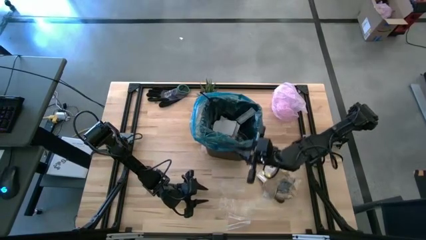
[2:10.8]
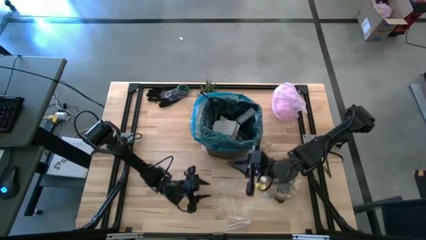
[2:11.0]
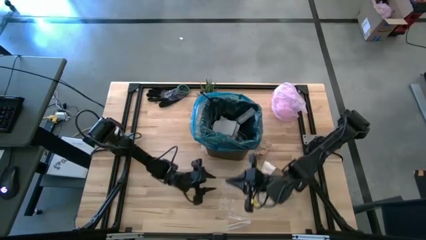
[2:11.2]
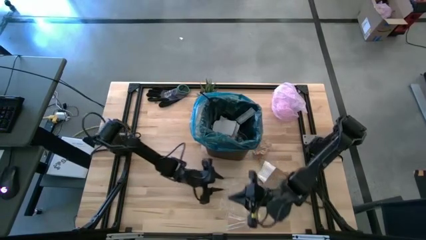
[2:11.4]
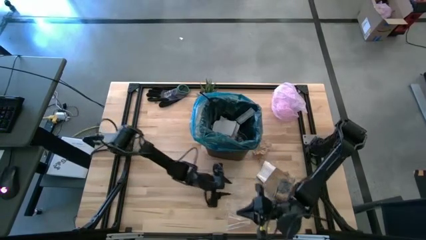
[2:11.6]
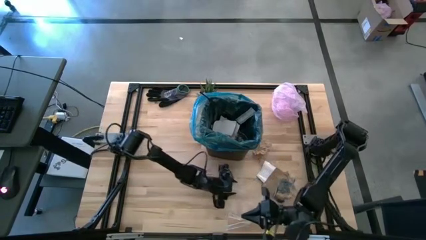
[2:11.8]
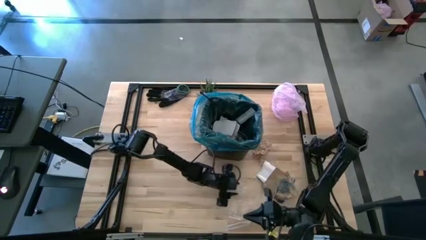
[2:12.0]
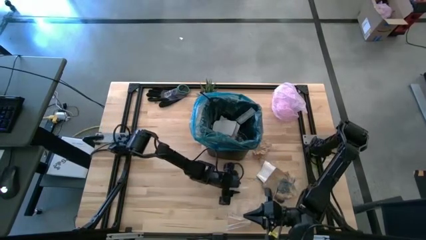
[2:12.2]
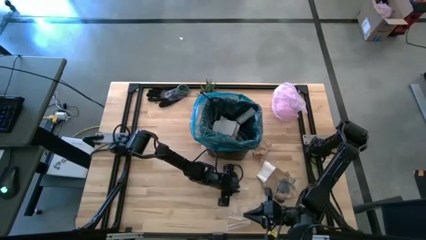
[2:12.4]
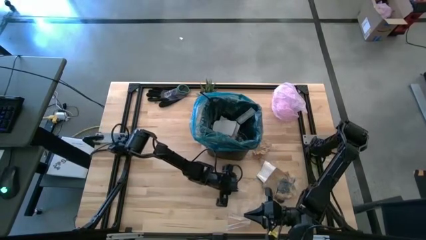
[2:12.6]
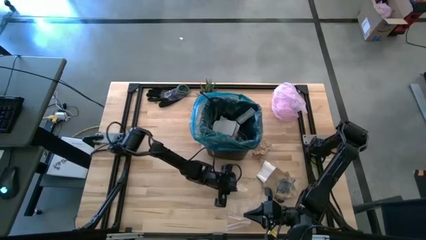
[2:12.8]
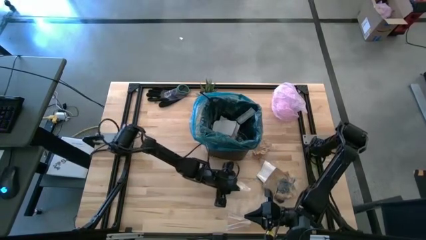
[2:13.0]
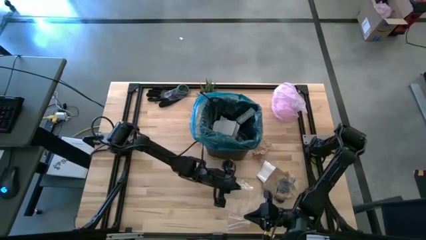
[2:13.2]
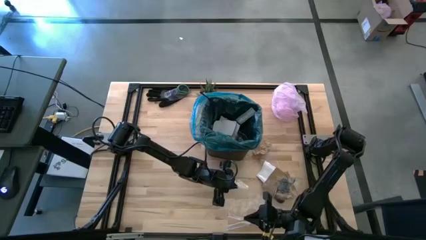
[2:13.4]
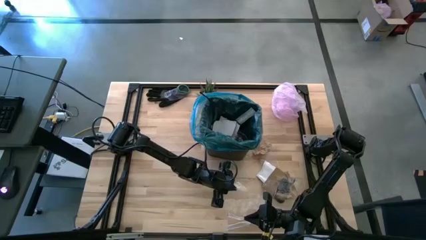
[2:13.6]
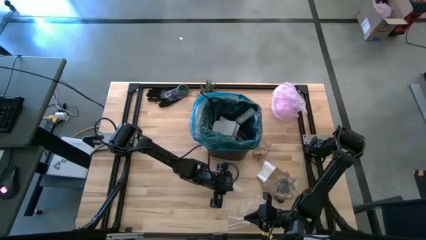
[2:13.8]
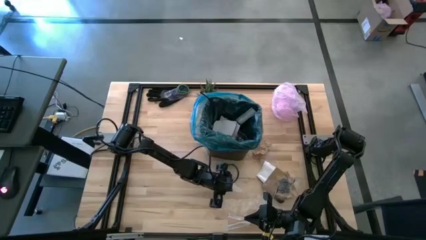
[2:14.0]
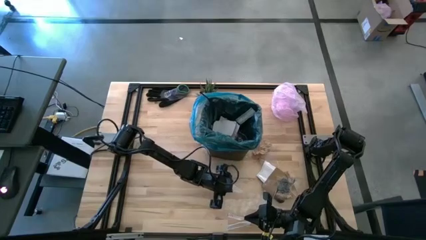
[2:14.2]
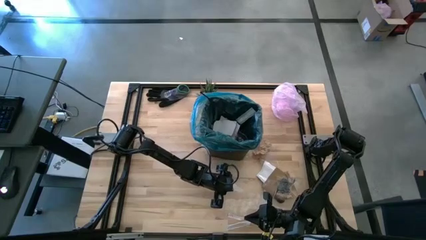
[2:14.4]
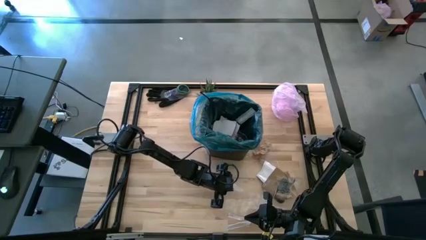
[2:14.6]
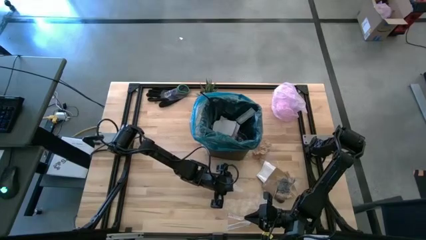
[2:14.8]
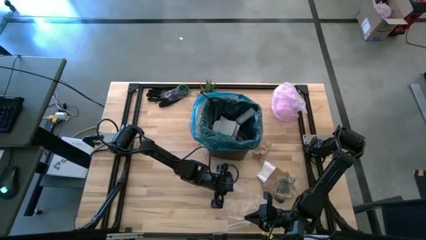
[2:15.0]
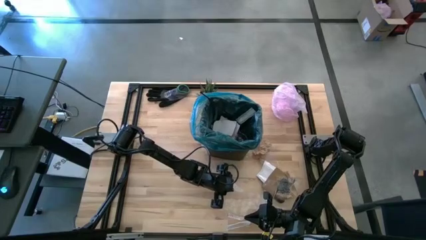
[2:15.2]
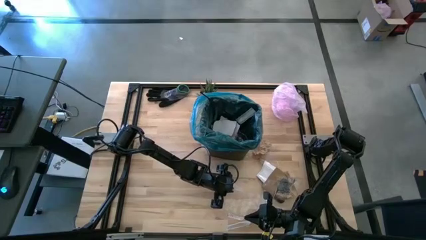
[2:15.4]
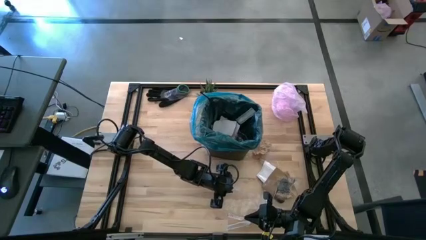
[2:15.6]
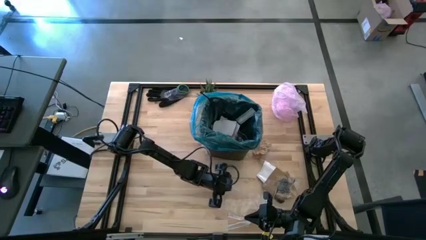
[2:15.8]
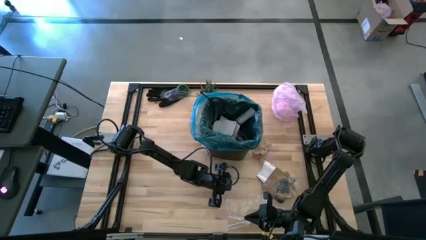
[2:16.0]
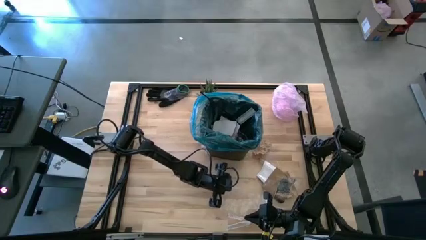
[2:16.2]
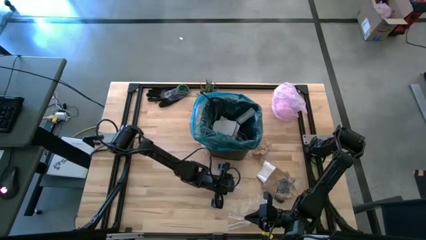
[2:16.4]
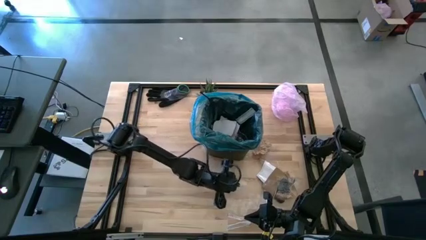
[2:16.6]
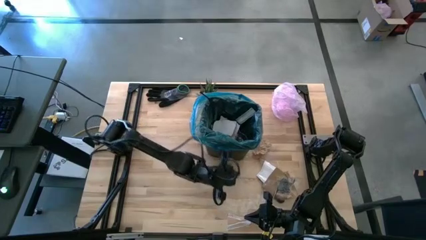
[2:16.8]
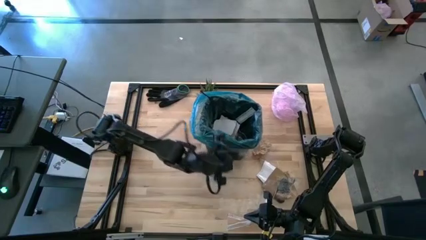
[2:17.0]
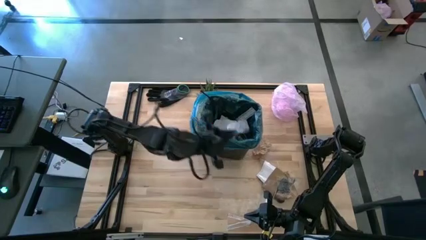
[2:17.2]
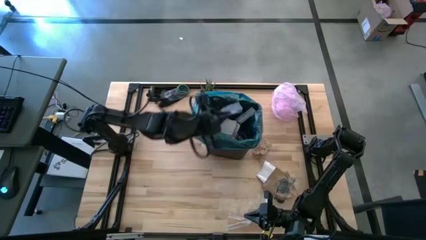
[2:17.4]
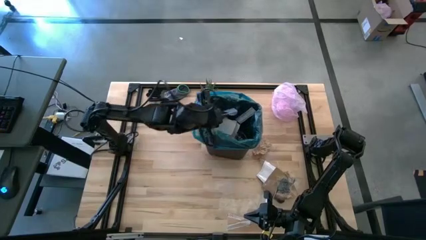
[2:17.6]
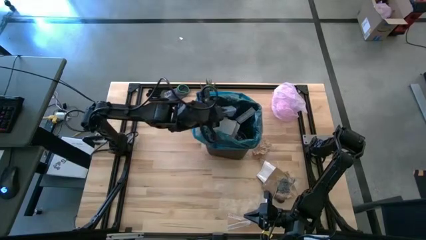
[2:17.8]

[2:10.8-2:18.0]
Task: place trash/remove bag and relplace
Put the transparent plastic into the trash bin

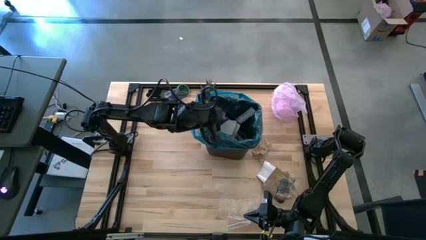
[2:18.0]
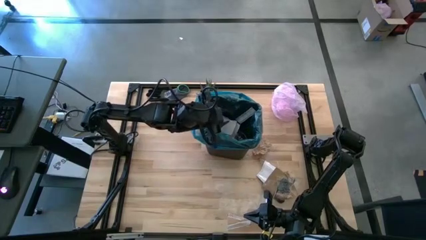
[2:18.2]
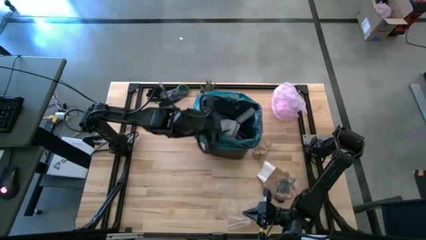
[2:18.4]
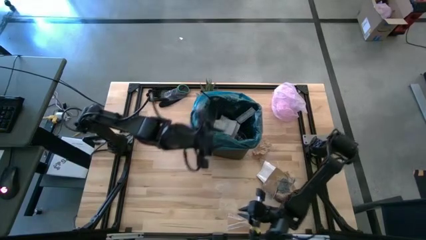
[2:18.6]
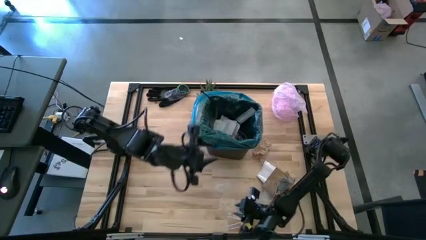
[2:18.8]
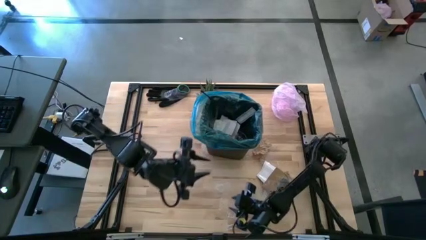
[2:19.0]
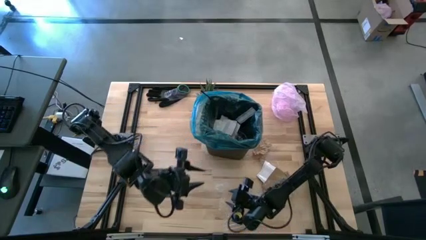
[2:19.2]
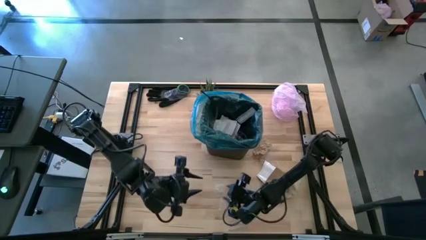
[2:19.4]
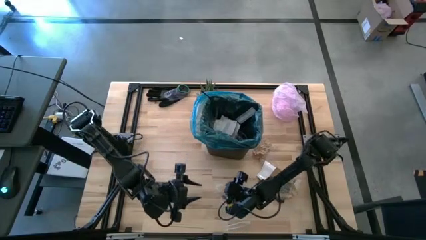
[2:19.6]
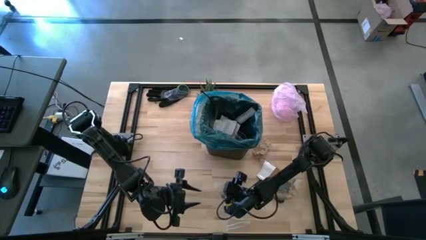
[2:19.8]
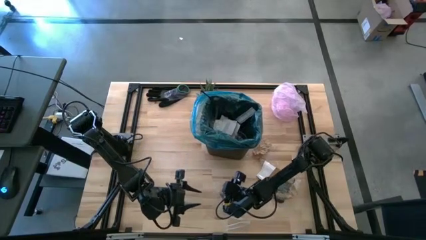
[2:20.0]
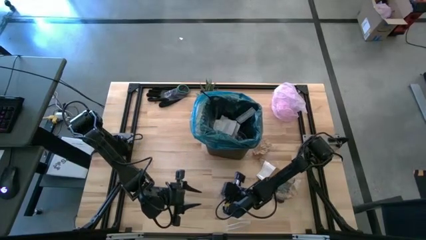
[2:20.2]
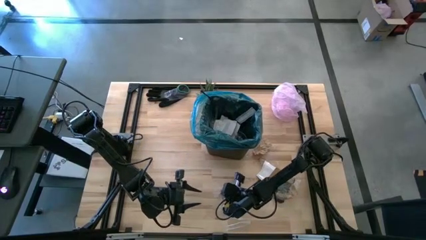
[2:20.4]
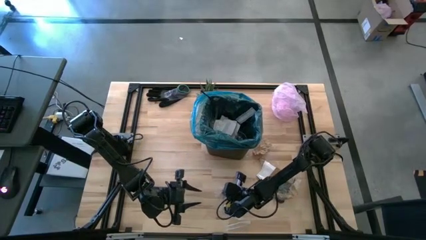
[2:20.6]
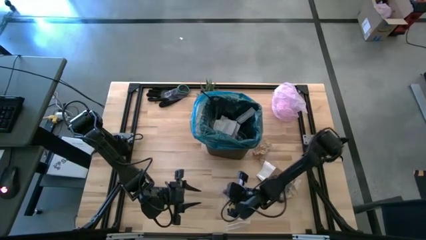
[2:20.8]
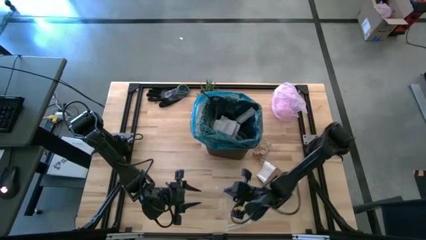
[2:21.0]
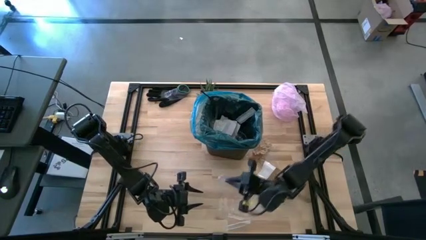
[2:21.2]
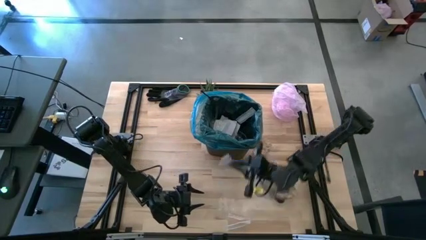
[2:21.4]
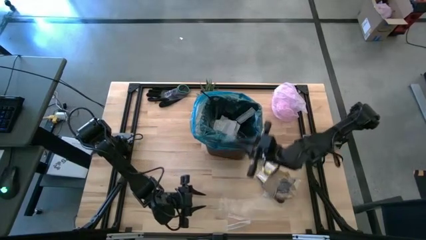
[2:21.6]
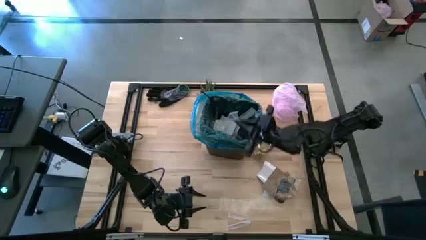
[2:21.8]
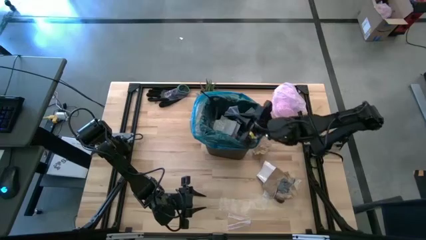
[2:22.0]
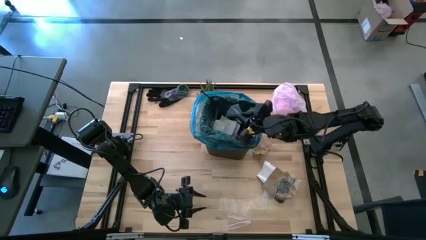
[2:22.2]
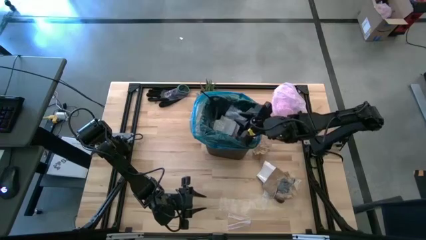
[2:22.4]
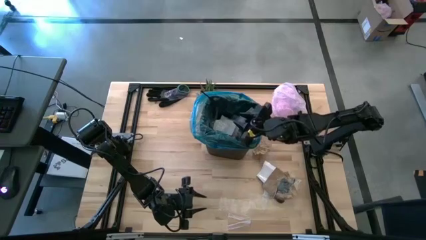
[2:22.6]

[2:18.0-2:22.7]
Put the transparent plastic into the trash bin

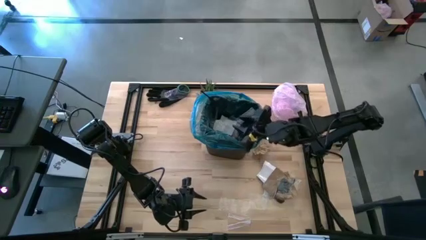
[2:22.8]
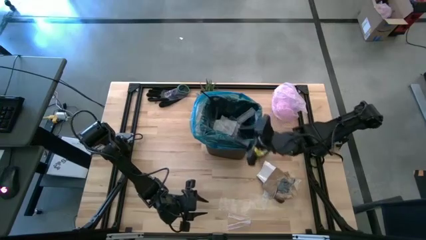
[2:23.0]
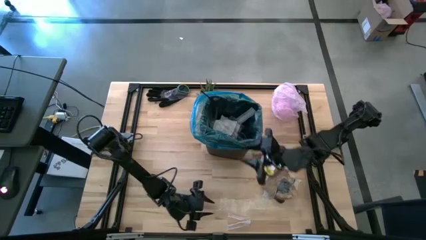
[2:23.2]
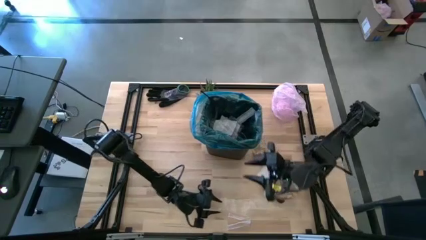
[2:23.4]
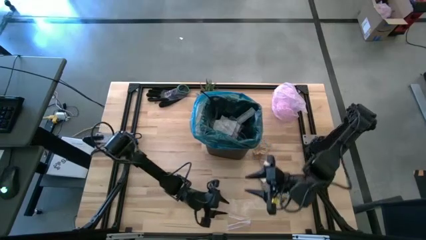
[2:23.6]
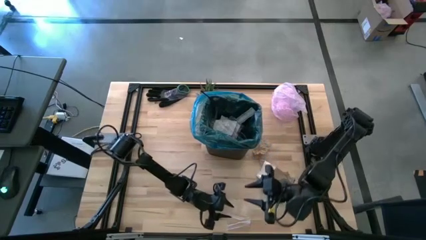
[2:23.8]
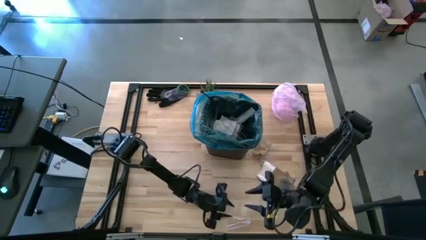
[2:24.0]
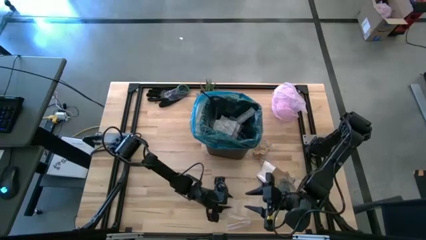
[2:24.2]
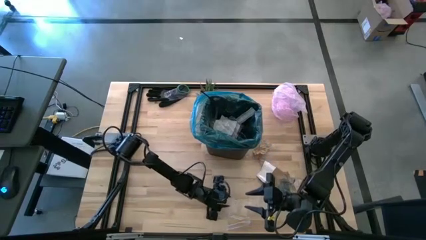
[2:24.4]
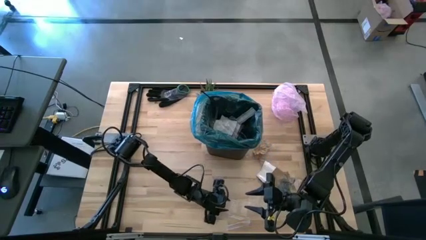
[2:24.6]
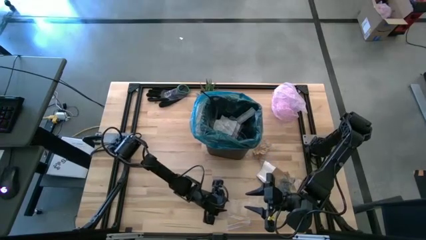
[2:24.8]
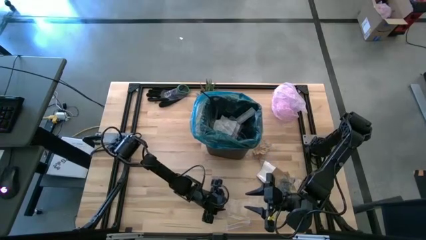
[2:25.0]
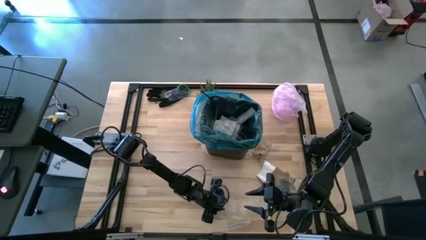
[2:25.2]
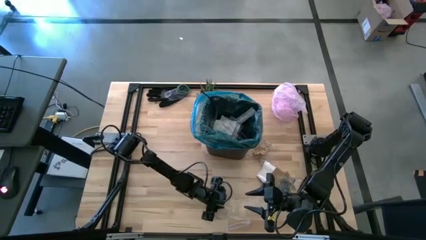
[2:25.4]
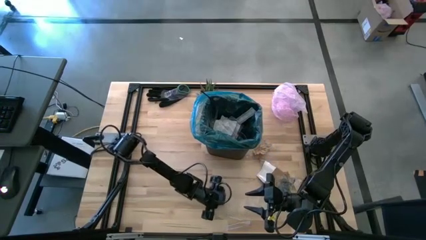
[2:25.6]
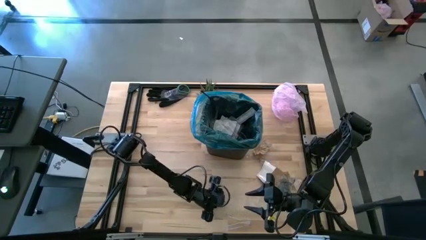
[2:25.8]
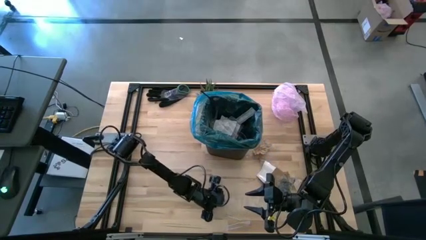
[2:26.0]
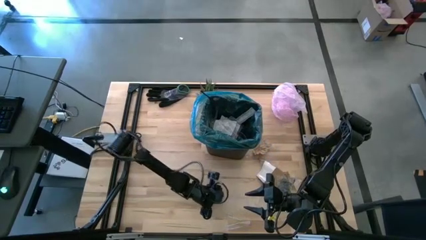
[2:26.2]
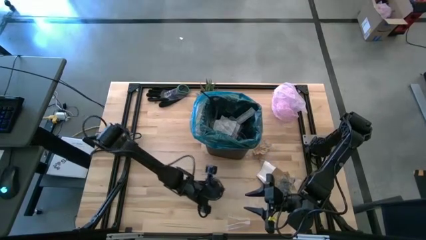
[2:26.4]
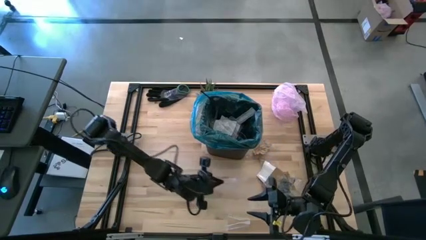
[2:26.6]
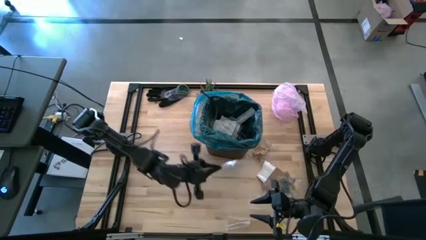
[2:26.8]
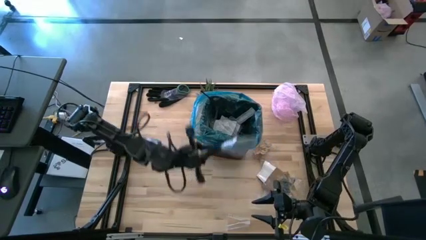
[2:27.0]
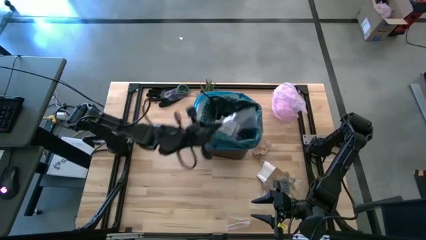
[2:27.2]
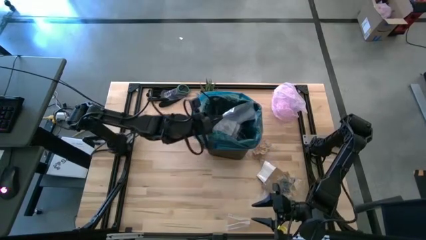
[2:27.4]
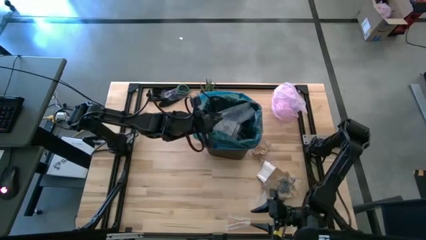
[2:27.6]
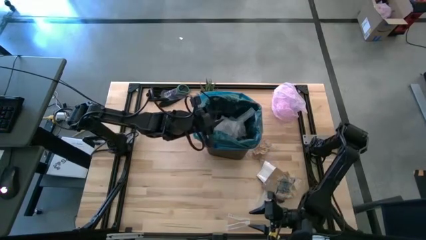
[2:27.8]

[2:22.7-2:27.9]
Put the transparent plastic into the trash bin

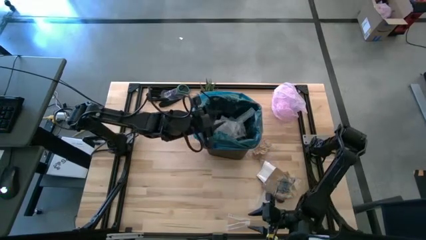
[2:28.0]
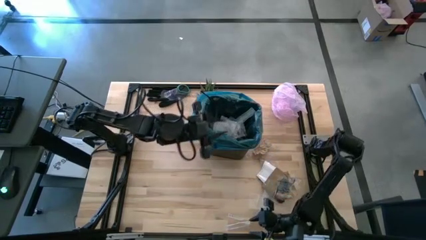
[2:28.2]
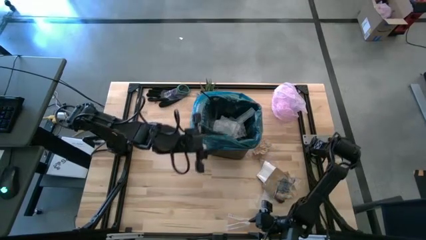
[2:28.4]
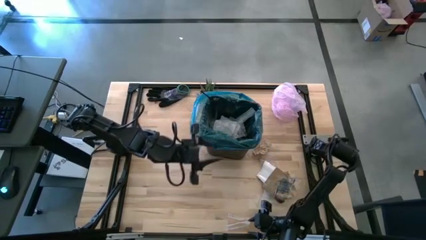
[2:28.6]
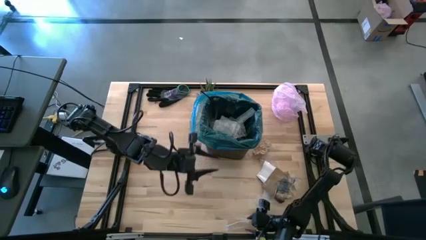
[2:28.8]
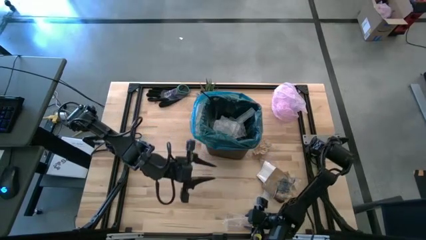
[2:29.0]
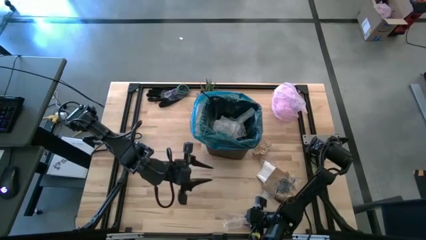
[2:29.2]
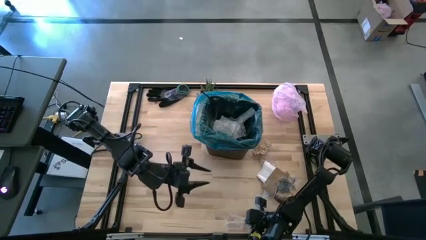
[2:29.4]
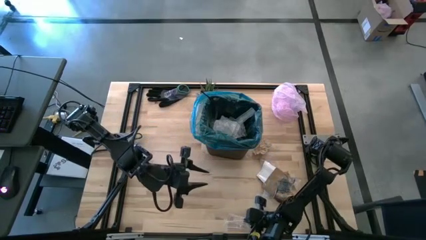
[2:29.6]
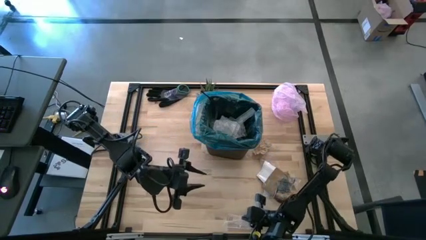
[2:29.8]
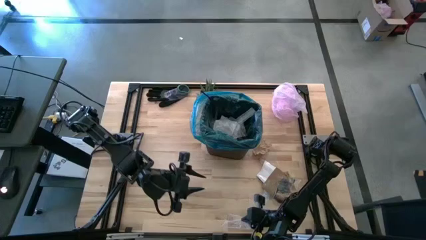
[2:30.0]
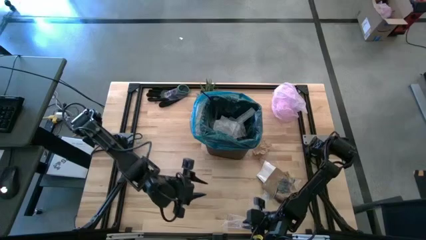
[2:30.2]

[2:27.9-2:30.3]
Put the transparent plastic into the trash bin
